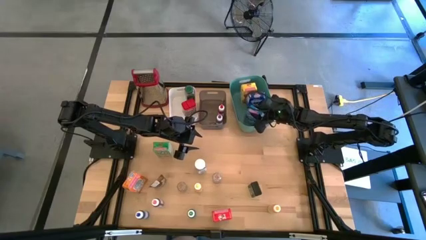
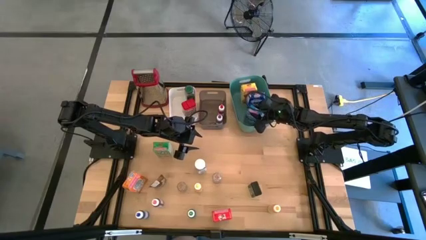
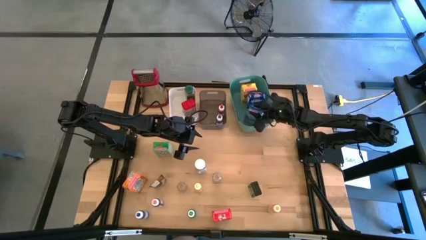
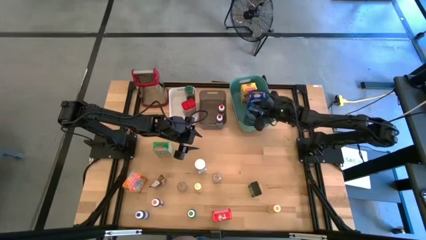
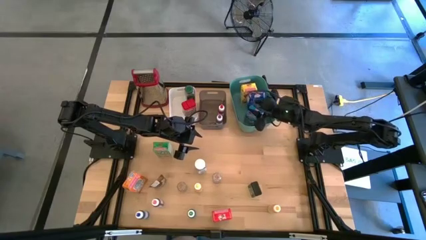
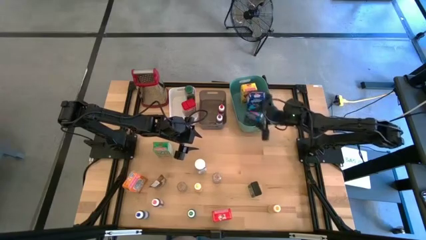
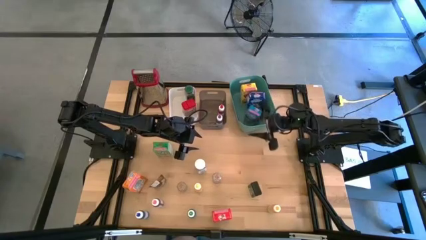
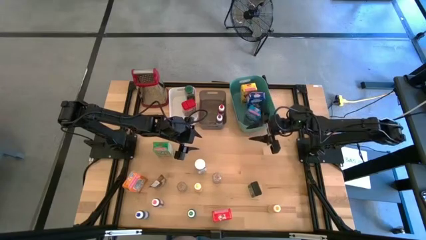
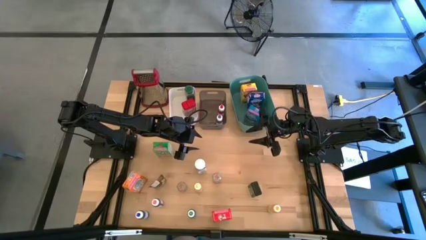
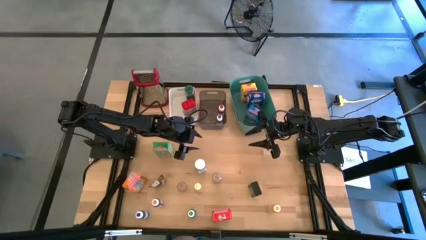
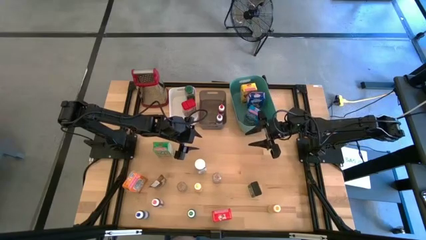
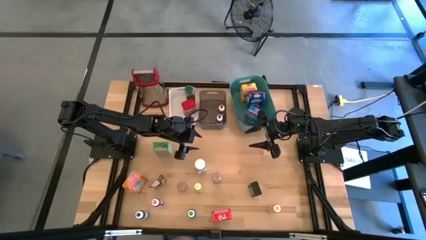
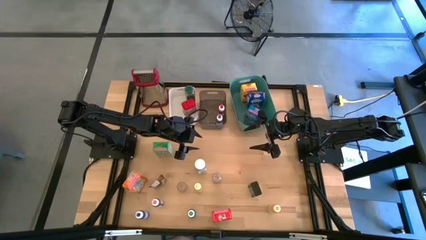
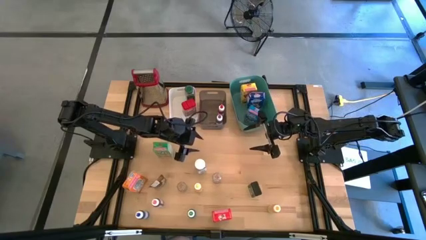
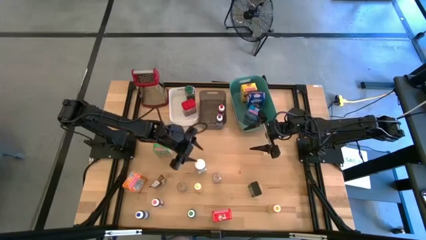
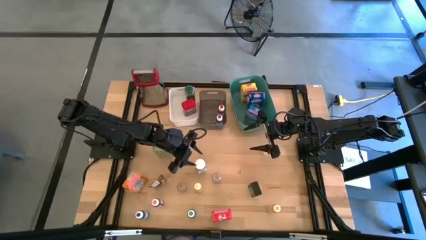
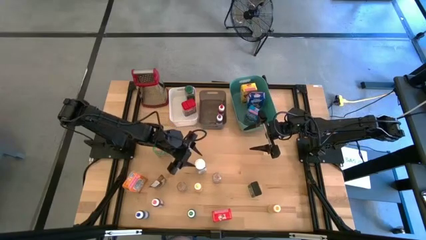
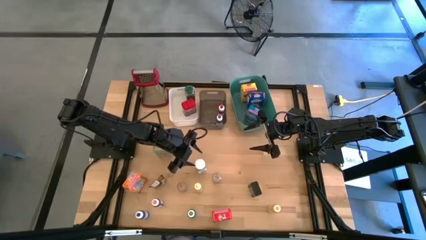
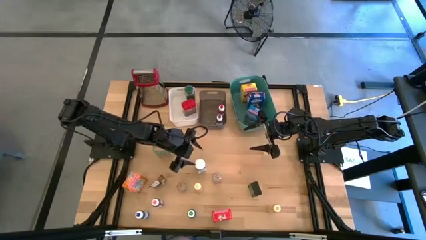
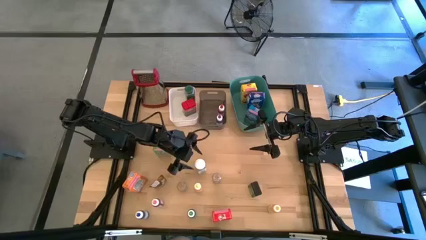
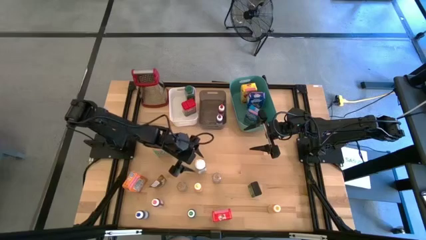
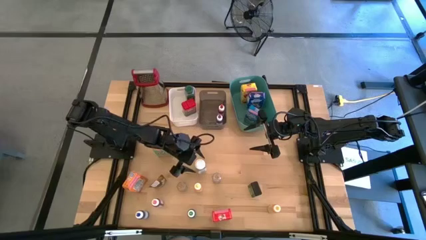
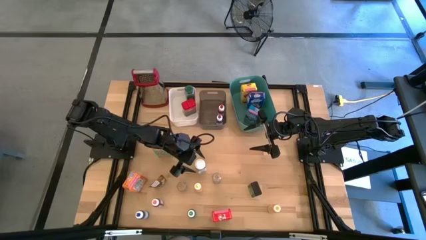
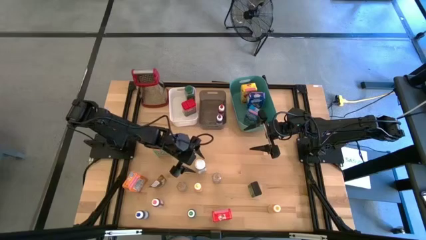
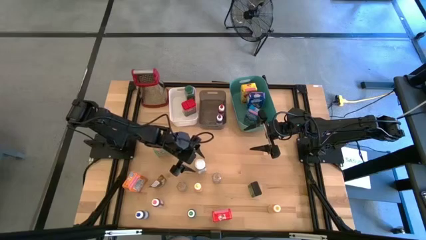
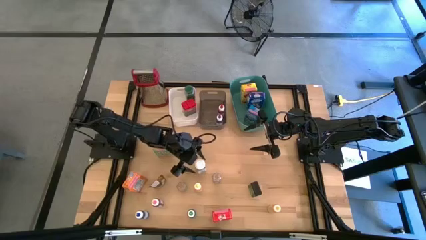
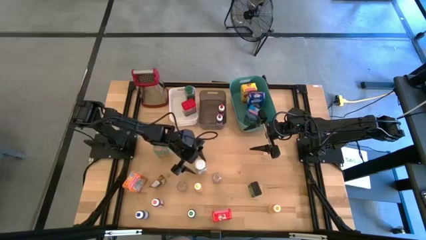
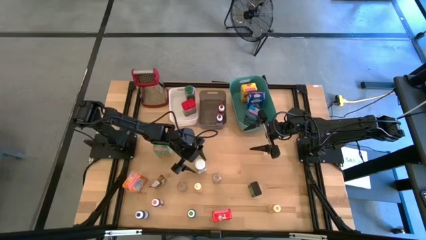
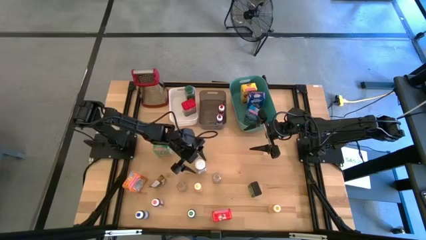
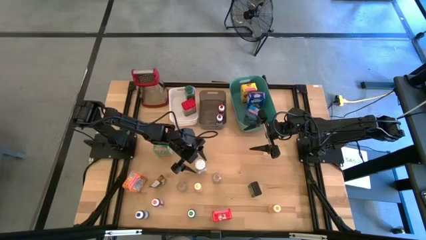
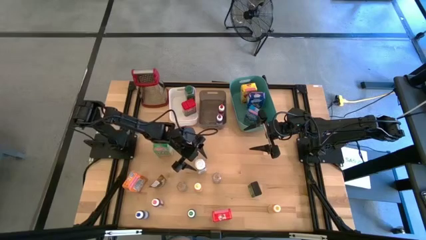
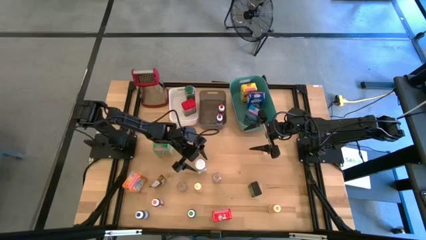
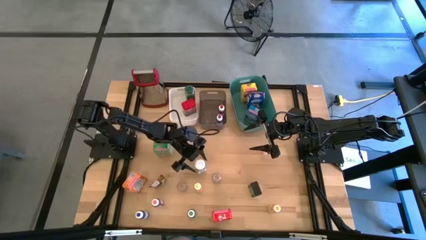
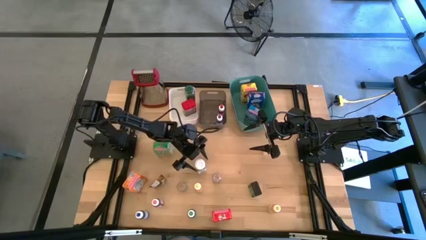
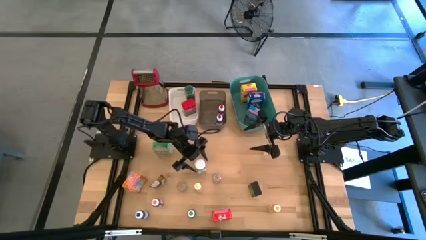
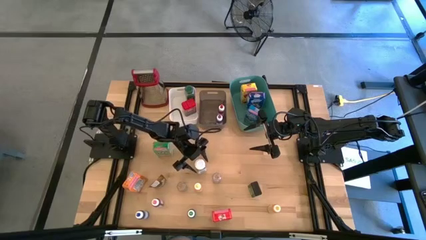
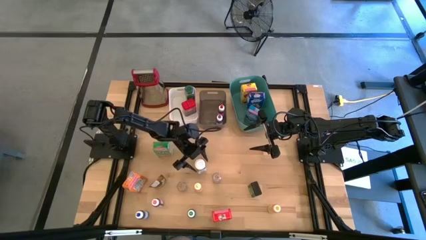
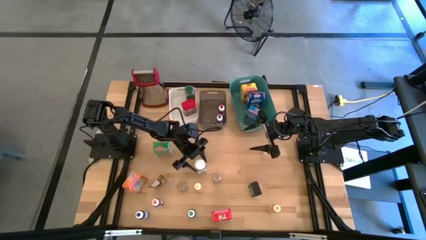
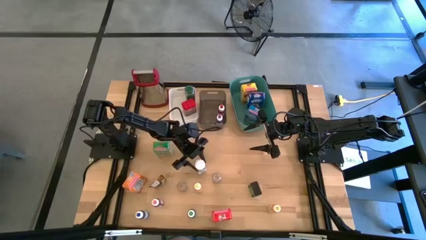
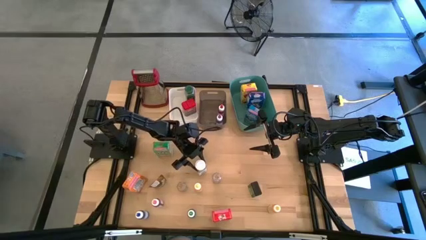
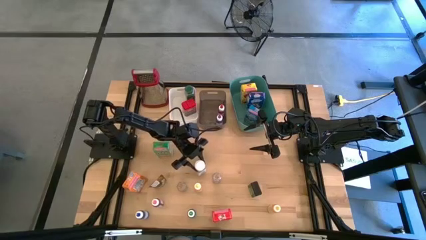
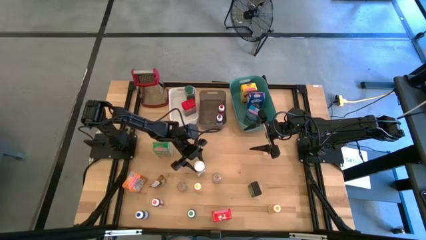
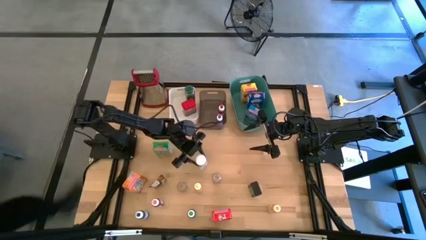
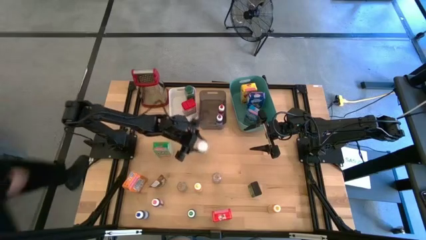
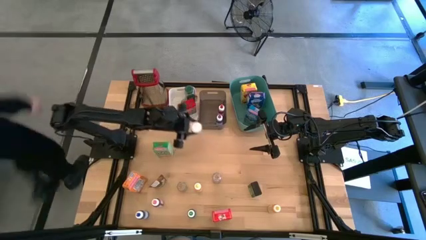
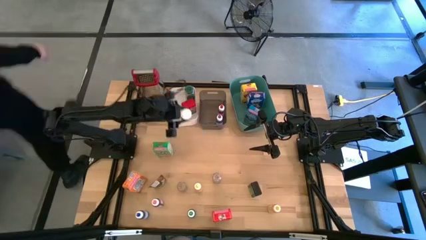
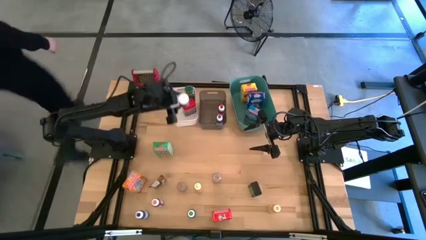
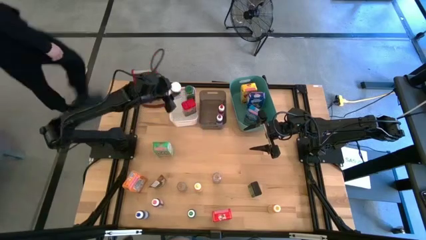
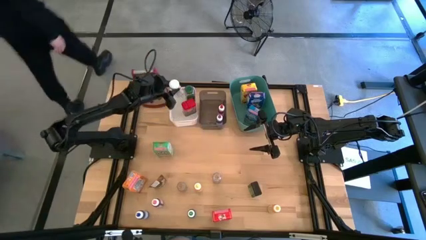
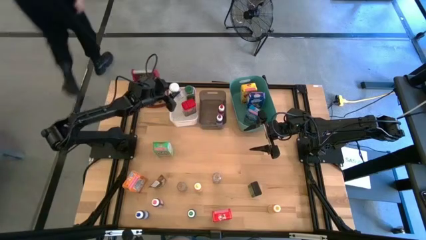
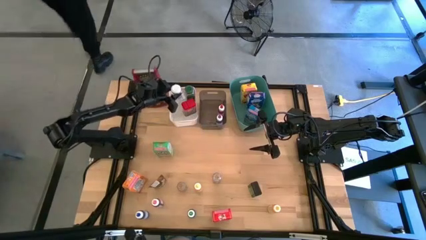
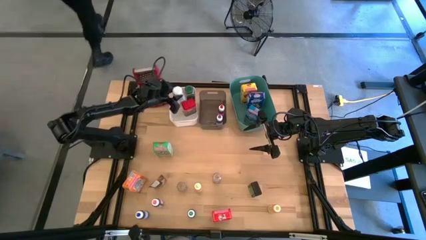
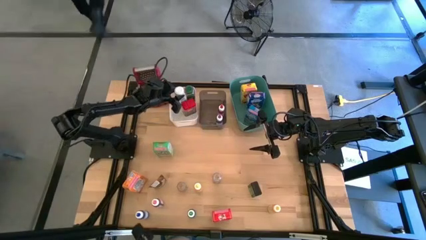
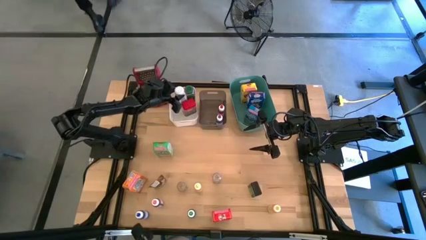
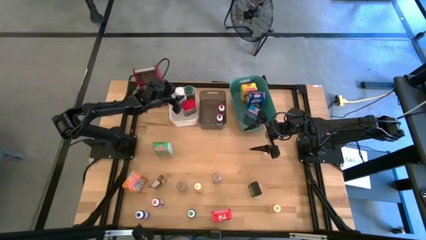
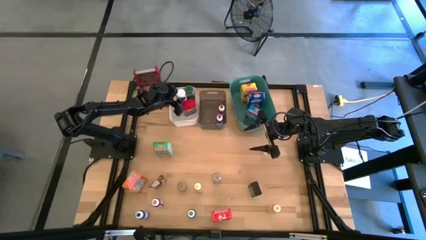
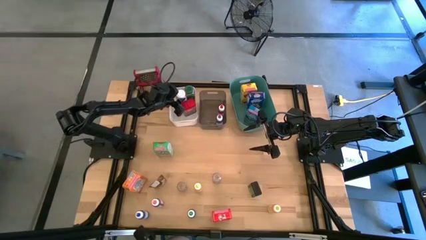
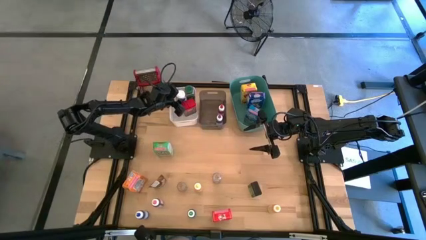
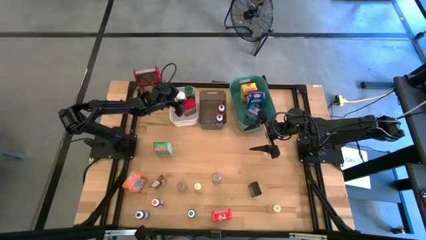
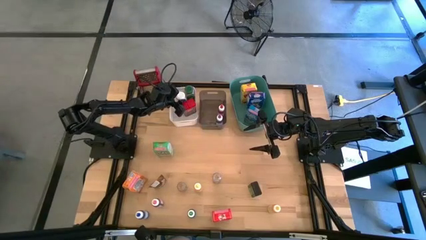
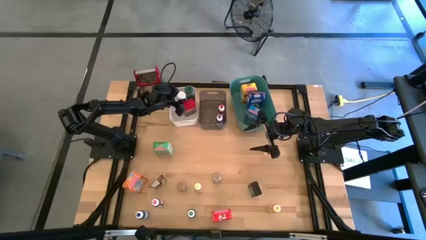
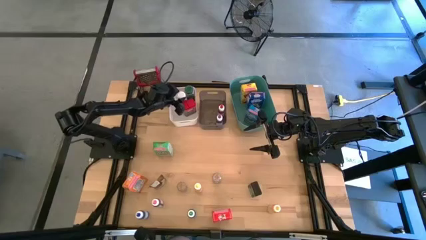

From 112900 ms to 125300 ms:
Task: Pick & Place Kitchen Items
Put the white spice bottle into the left white bin

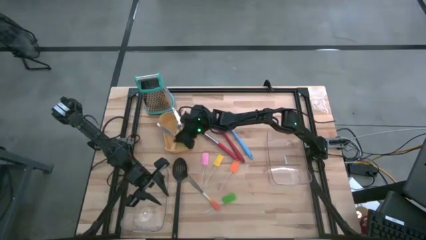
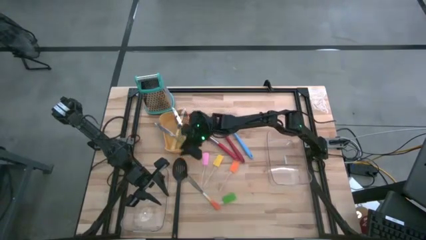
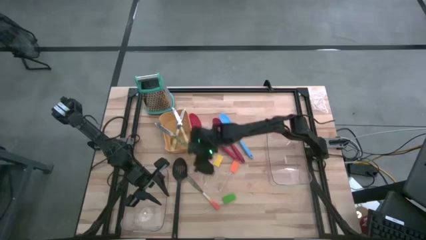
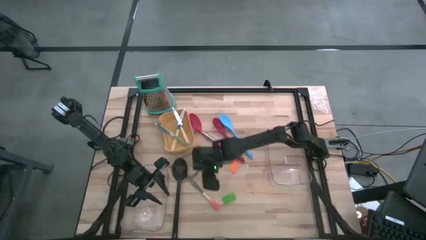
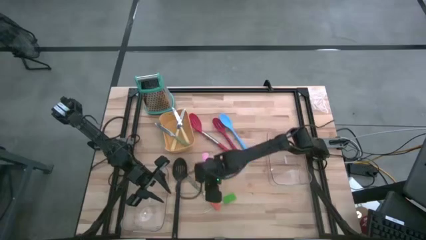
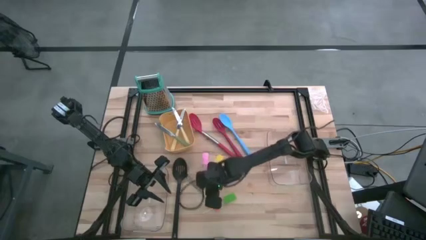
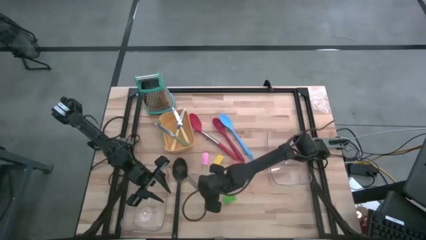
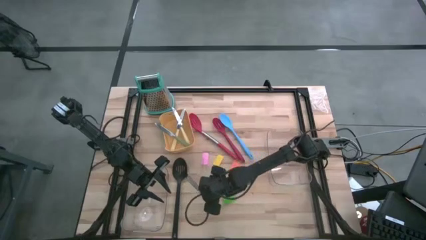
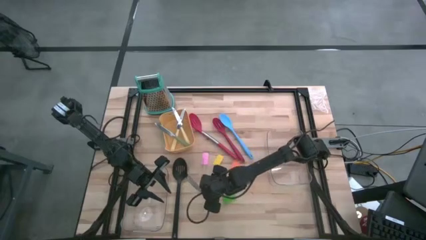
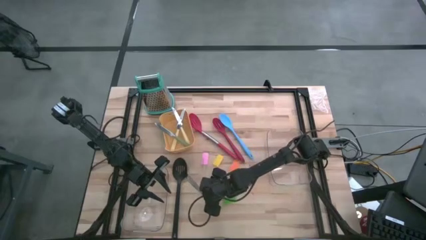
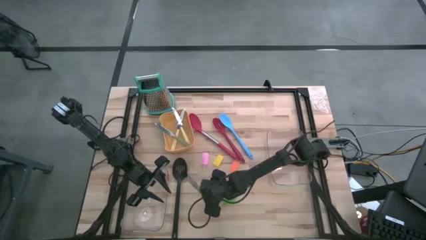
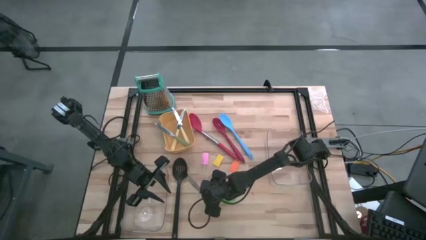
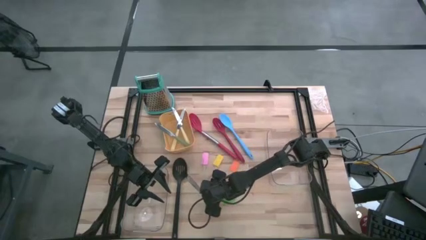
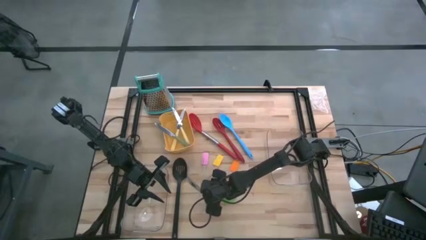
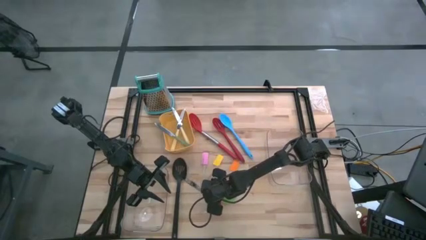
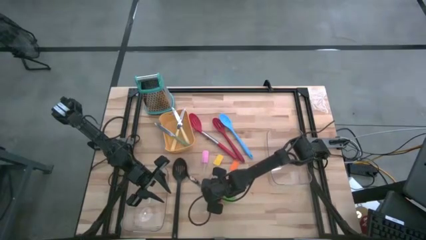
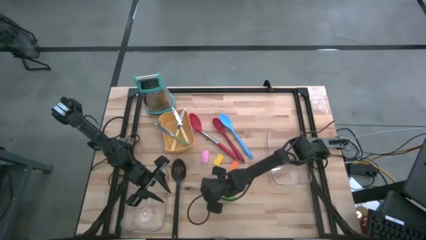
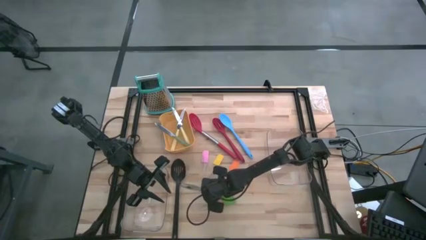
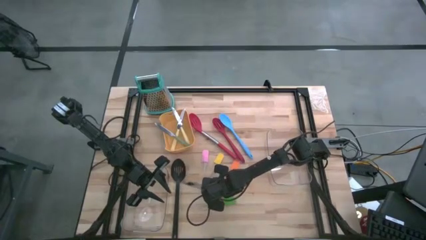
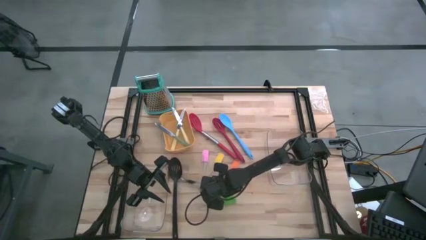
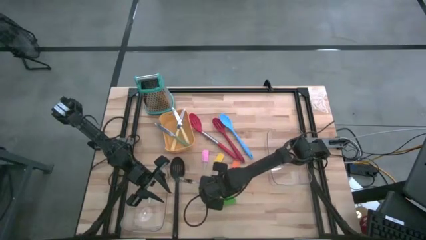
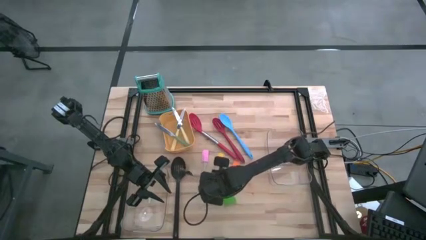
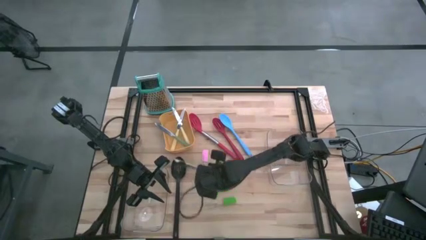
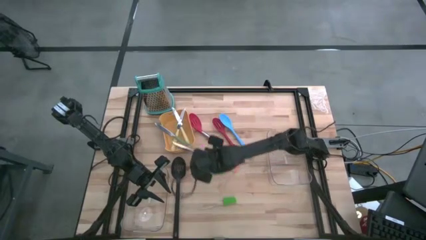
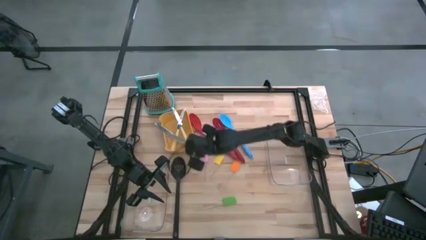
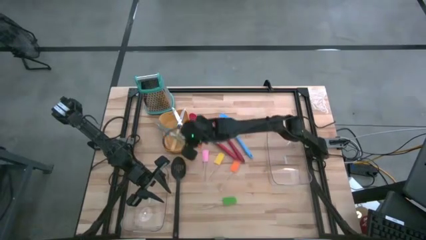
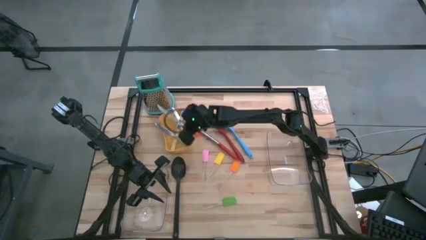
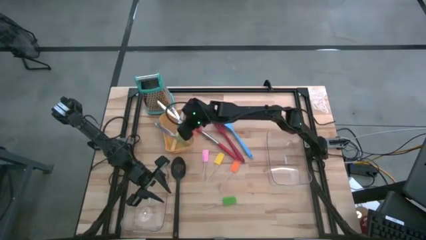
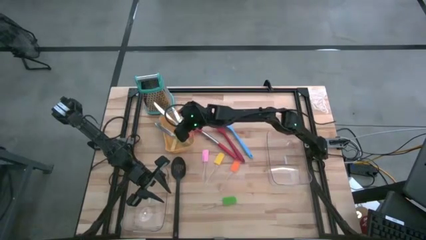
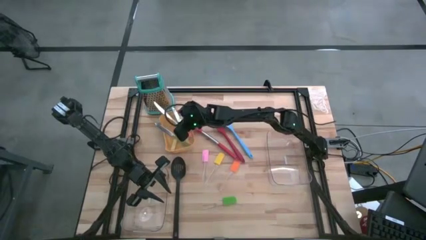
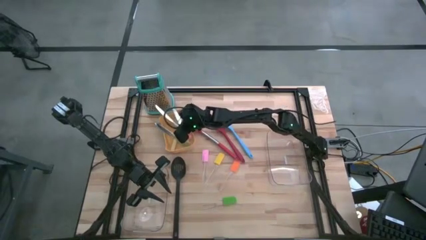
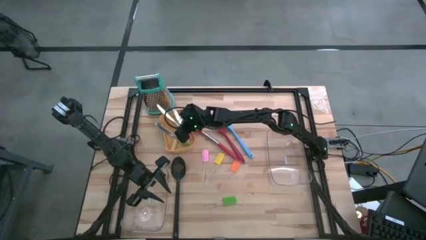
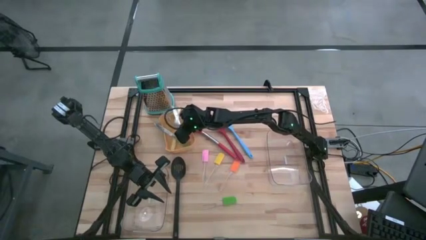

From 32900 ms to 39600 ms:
Task: Pick & Place Kitchen Items
Put the orange knife into the yellow bin
